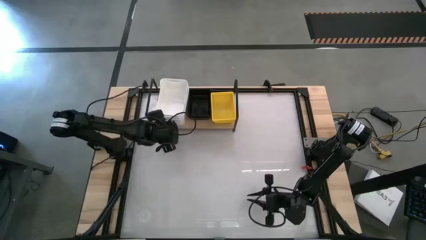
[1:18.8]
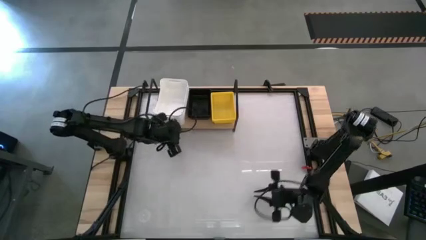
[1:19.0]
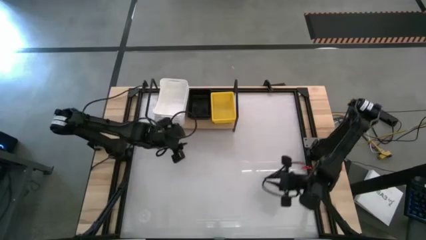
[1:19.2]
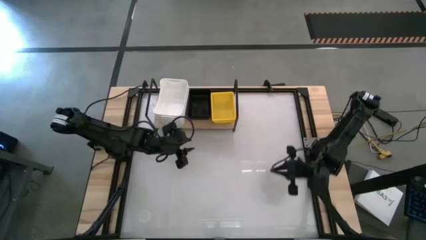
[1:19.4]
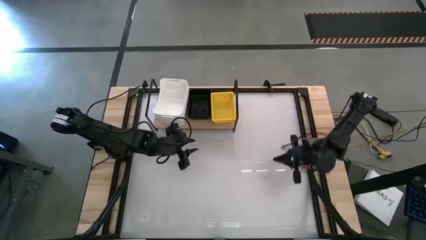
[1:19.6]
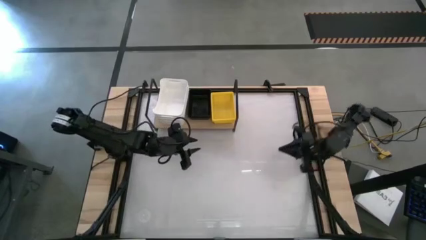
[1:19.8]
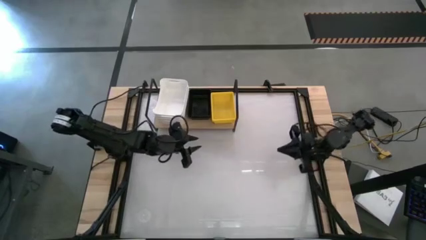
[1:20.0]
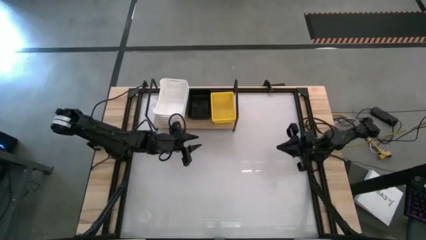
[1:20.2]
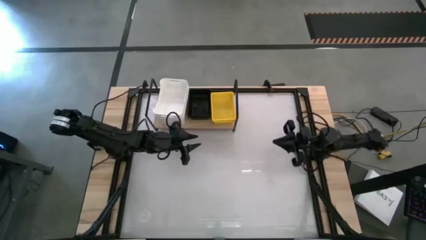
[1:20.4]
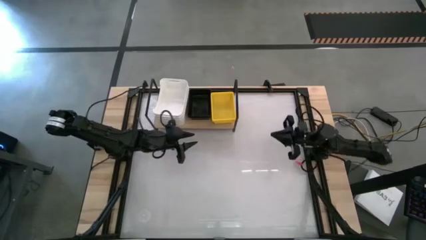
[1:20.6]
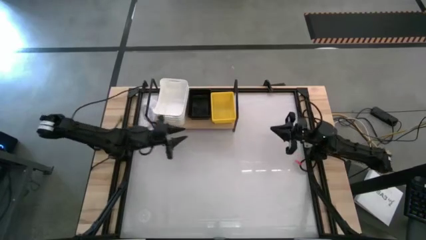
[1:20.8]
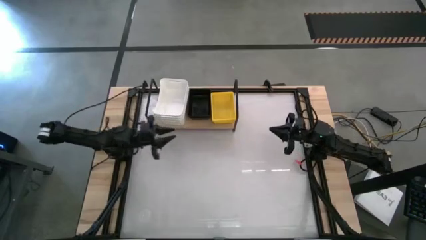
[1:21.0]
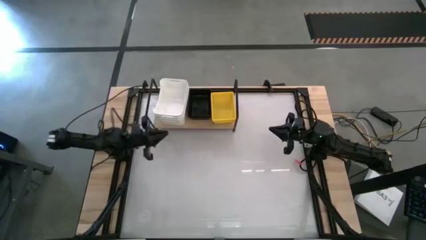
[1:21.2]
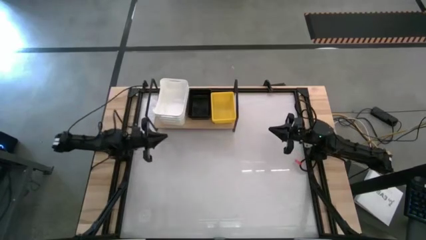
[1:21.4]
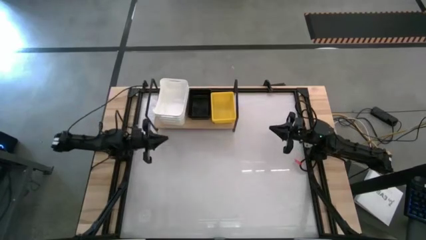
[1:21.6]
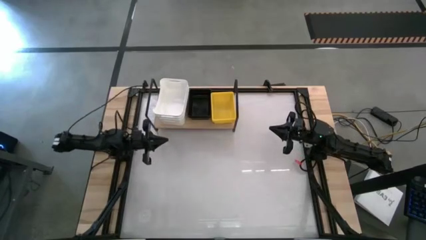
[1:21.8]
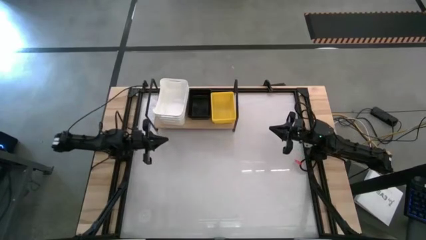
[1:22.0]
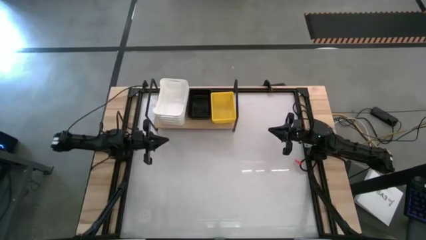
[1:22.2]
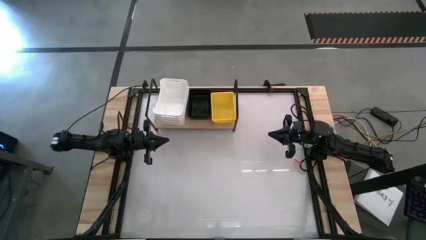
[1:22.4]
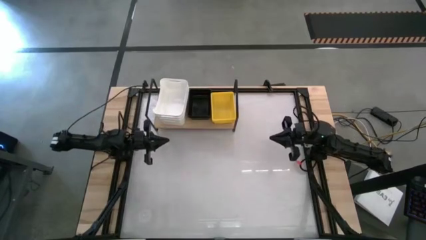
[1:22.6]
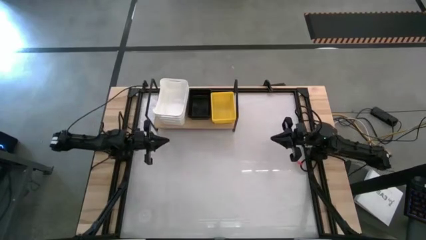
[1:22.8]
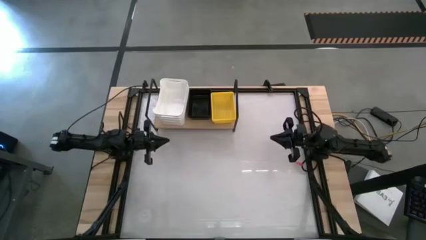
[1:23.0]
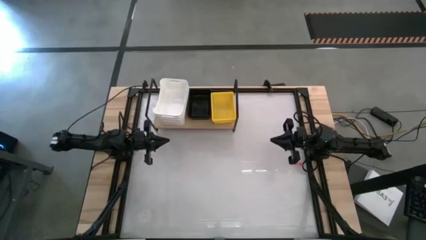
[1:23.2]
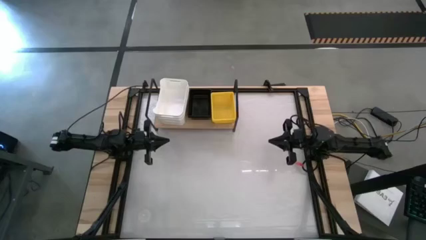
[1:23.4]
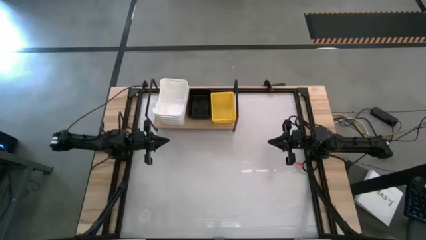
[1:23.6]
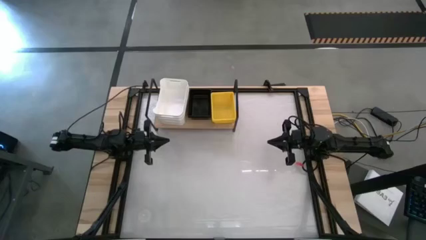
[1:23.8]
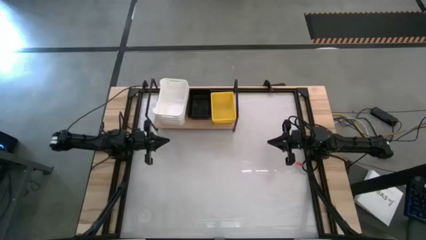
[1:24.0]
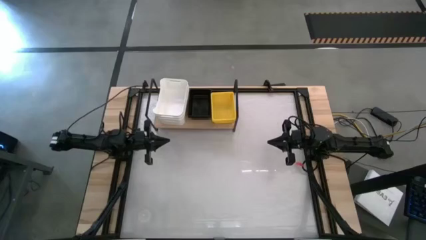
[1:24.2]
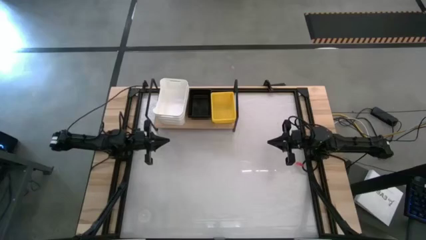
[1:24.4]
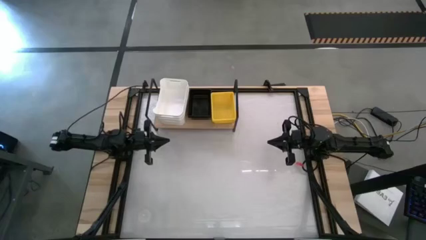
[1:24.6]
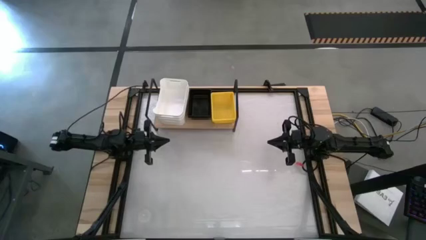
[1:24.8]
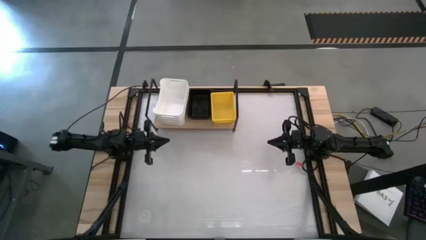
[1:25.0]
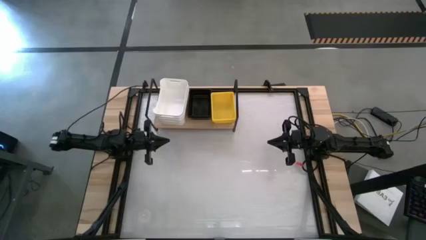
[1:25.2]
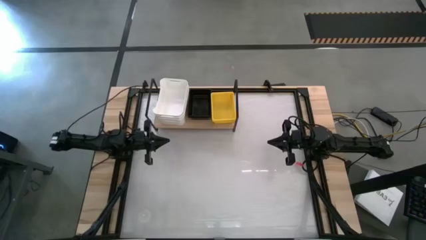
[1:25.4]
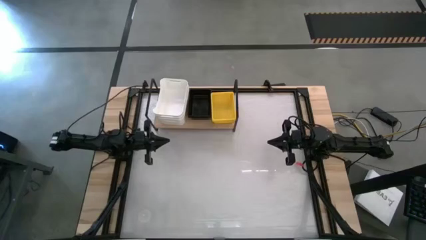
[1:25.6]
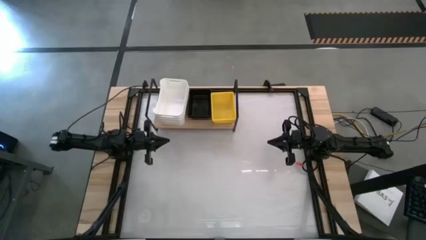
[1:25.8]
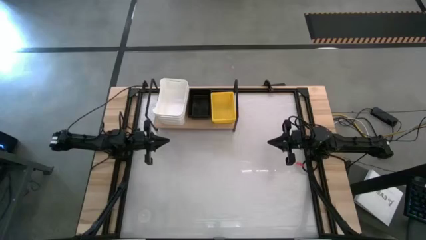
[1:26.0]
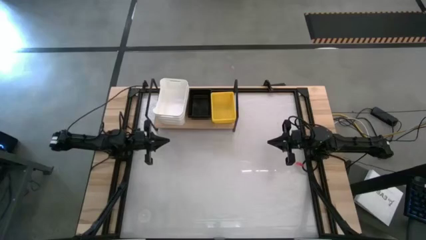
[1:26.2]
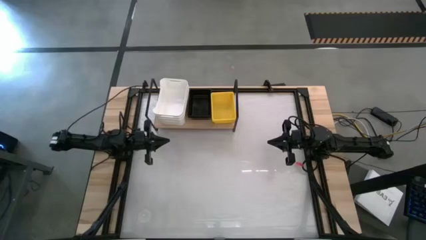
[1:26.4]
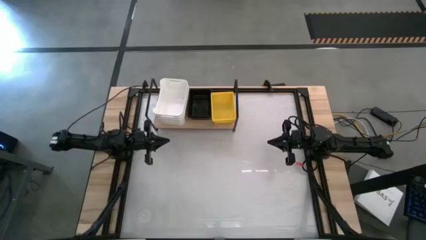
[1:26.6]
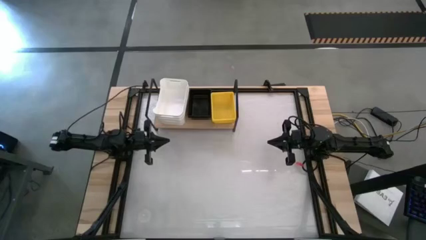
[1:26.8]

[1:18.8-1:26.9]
Task: Stack baskets on shelf by color
Return to Home Position

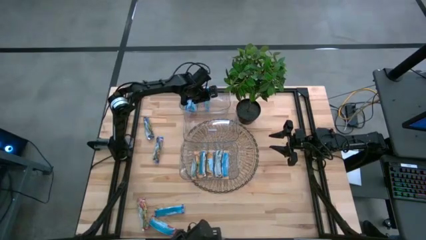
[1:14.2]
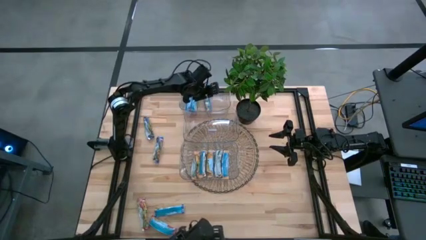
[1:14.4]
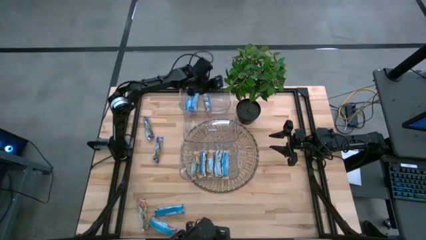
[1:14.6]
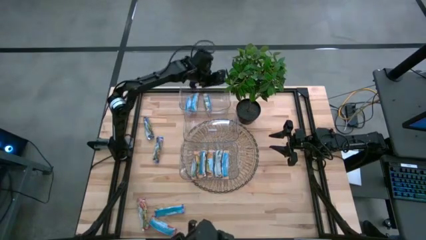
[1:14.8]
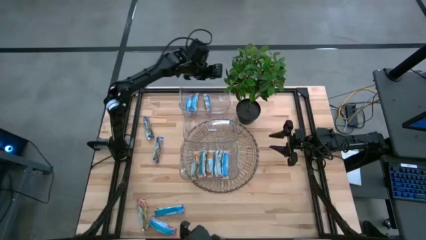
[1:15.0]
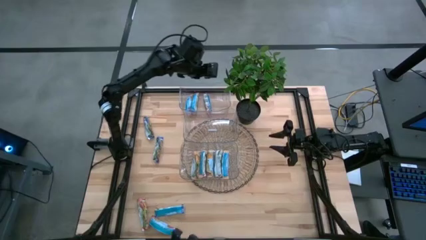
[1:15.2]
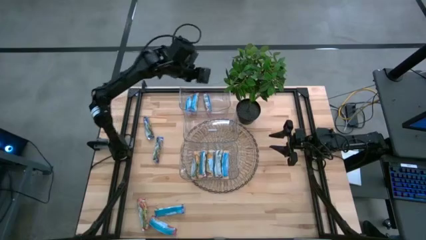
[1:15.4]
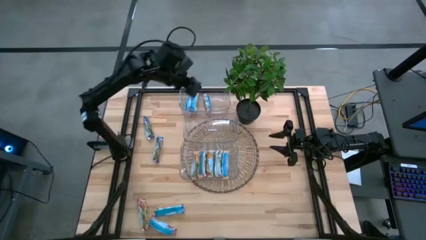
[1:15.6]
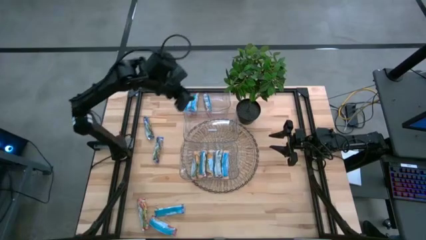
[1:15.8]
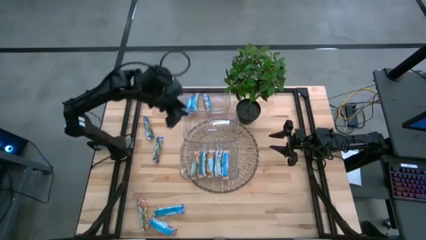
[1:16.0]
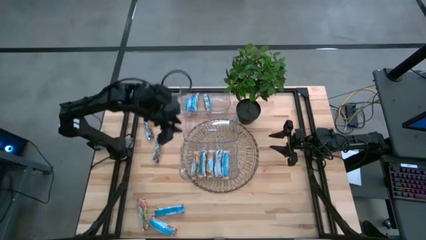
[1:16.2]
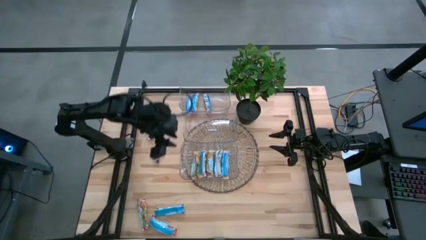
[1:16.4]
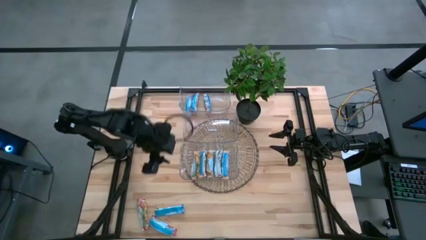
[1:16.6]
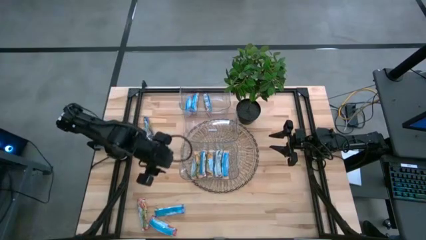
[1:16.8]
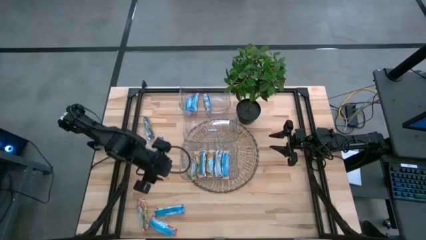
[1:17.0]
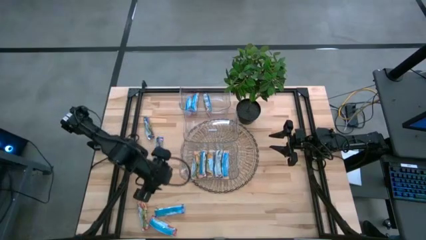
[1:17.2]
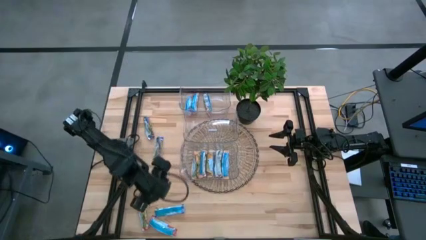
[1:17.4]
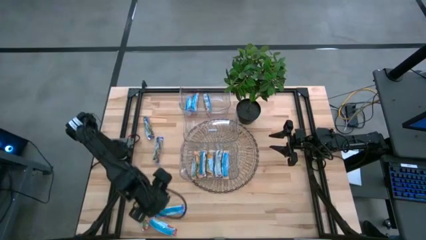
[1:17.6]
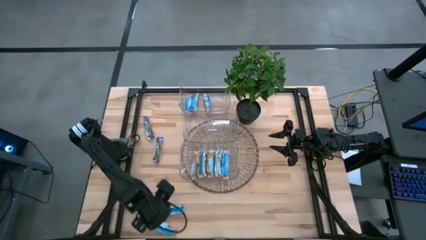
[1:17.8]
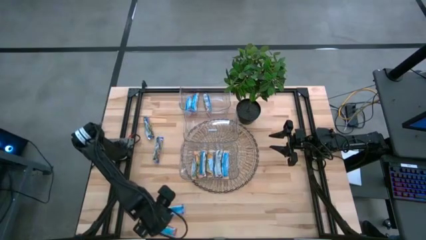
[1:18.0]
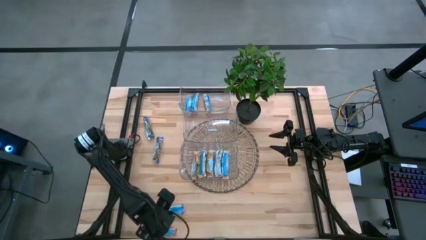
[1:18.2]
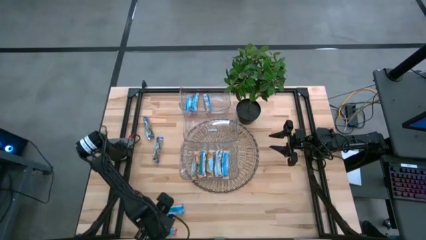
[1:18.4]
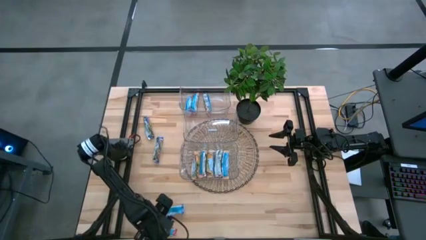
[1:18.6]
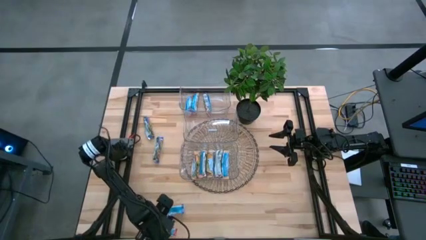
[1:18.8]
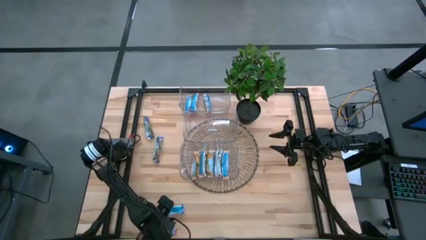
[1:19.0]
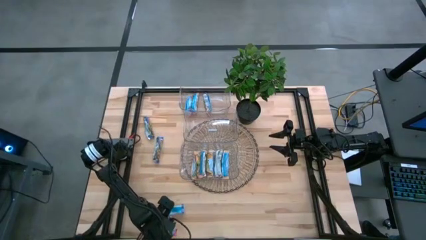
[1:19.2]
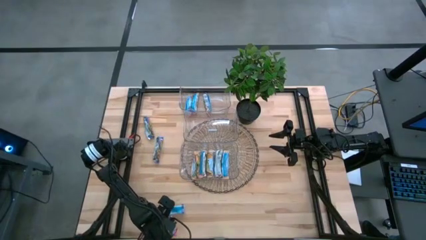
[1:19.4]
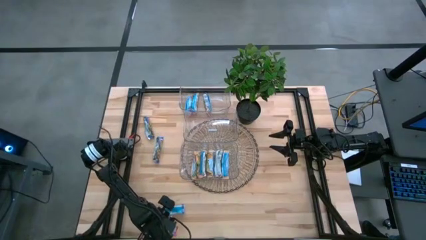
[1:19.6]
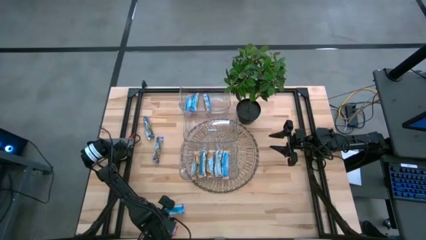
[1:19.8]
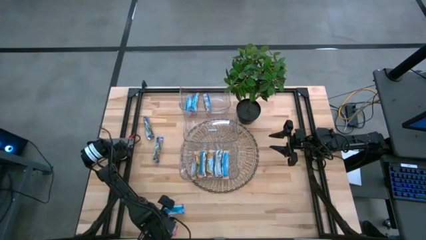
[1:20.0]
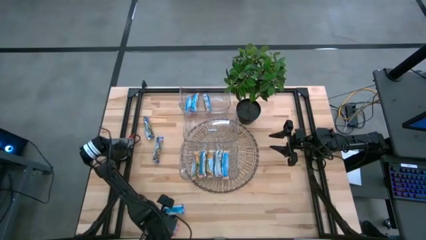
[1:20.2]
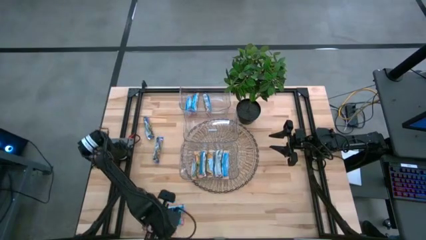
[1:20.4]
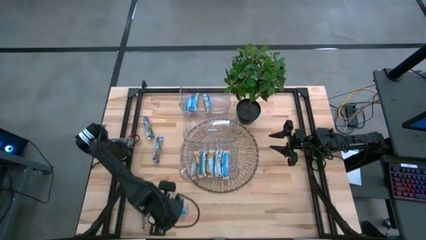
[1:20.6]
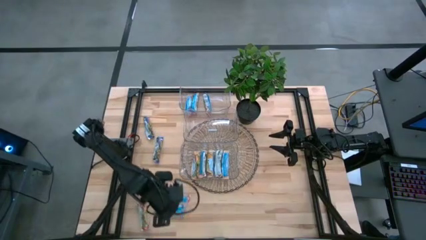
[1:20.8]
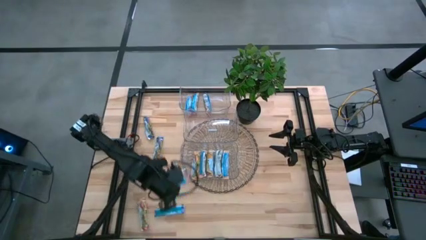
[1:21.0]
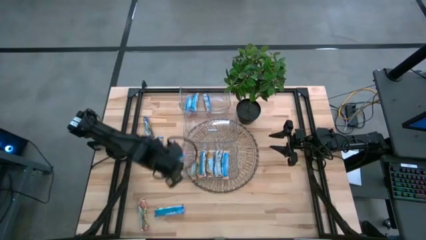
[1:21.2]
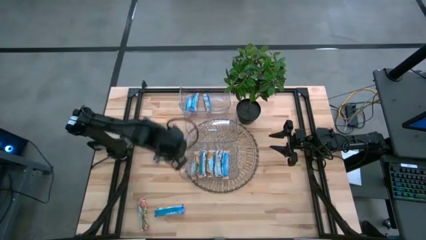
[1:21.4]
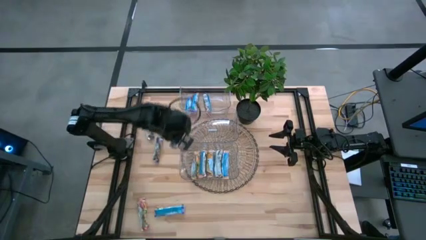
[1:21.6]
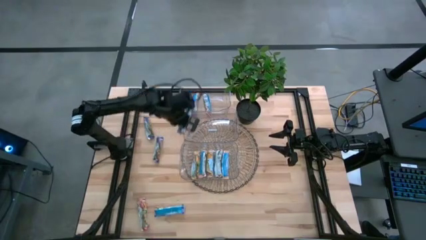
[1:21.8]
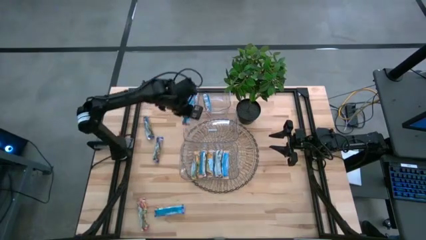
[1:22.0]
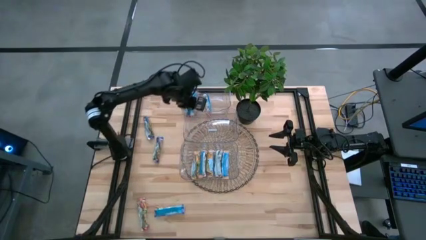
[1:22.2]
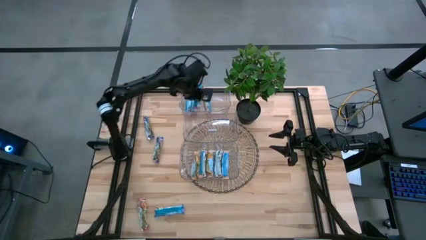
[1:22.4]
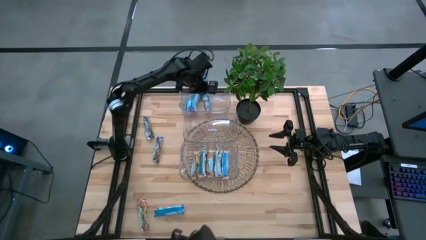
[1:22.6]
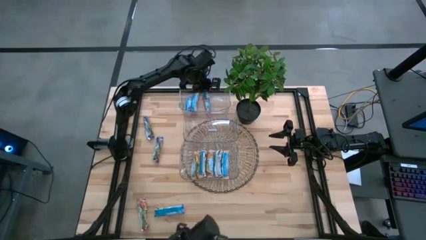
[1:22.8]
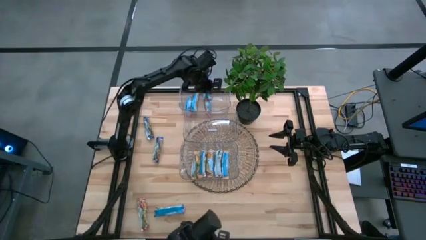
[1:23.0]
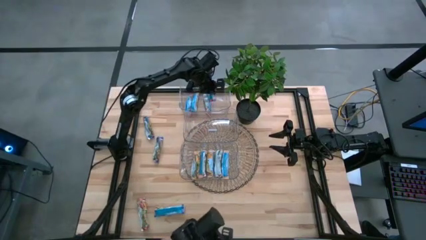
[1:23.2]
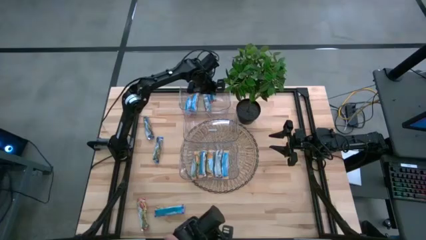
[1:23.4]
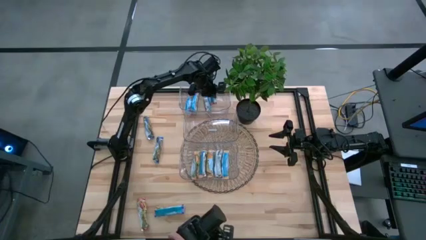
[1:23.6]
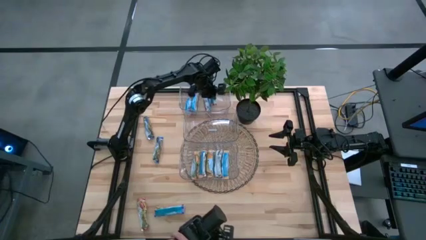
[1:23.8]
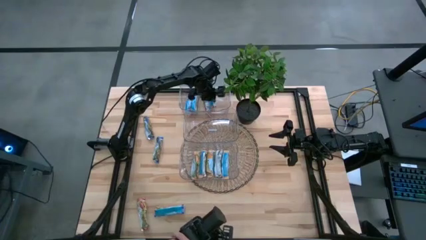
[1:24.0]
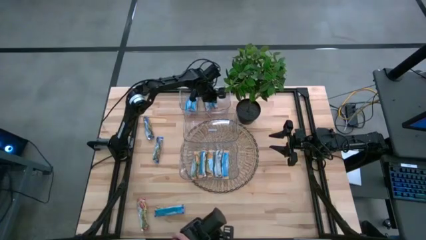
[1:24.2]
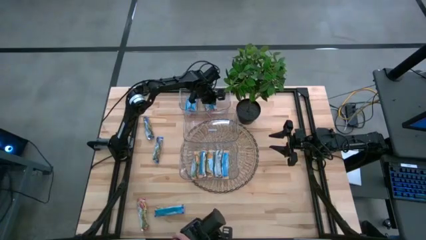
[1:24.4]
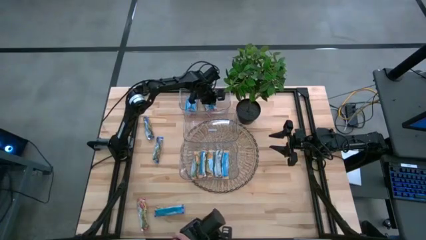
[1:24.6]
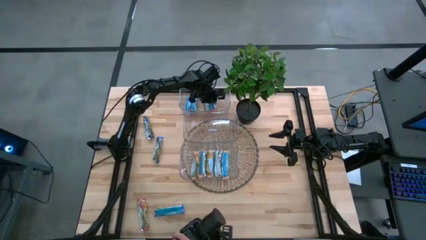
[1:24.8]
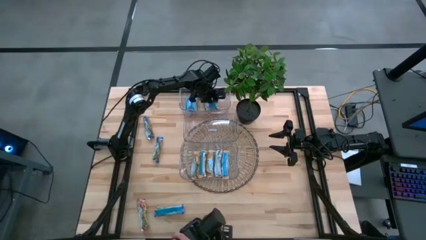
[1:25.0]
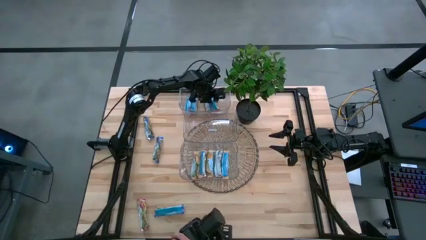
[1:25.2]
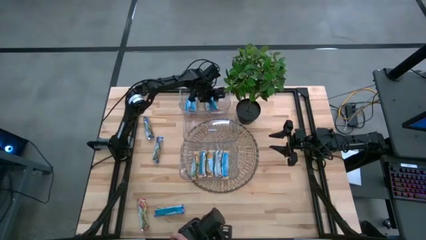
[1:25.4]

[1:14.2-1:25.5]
Task: Pick and place Granola Bars by type
Put the red granola bar into the top transparent bin
